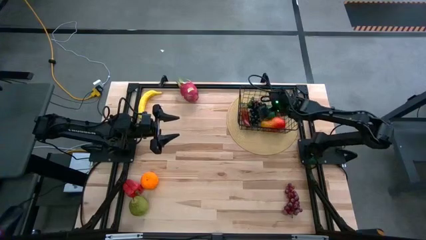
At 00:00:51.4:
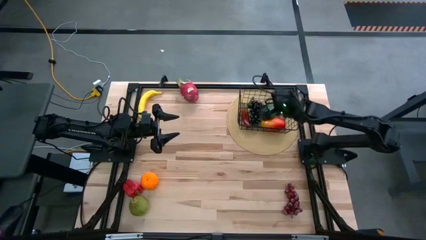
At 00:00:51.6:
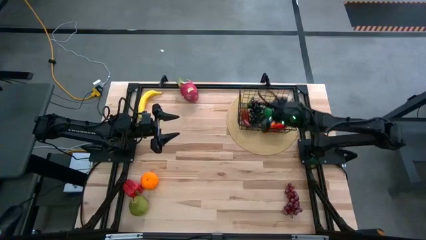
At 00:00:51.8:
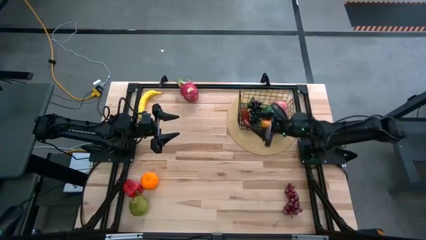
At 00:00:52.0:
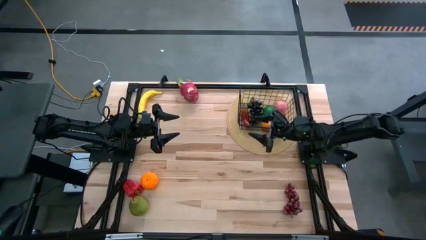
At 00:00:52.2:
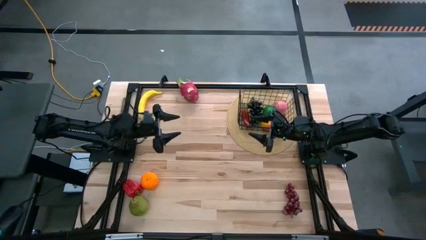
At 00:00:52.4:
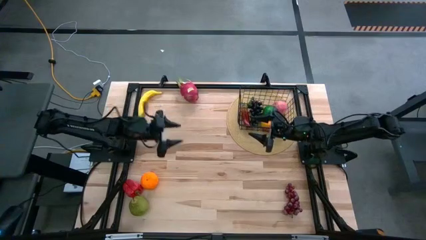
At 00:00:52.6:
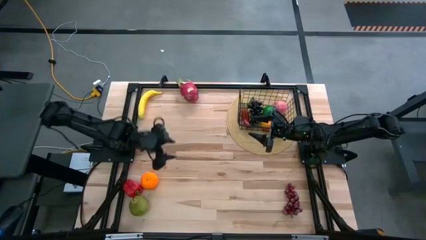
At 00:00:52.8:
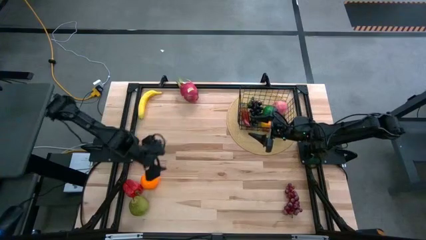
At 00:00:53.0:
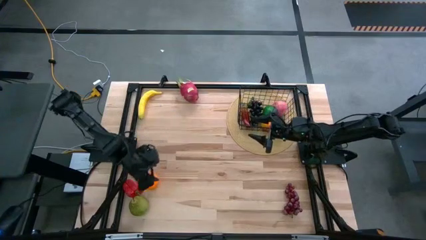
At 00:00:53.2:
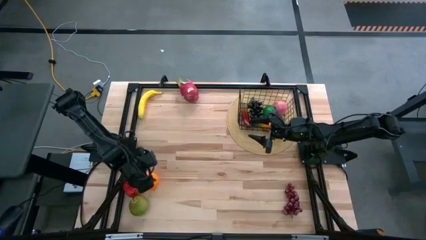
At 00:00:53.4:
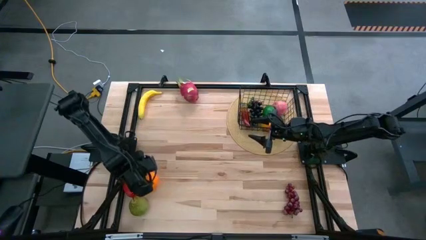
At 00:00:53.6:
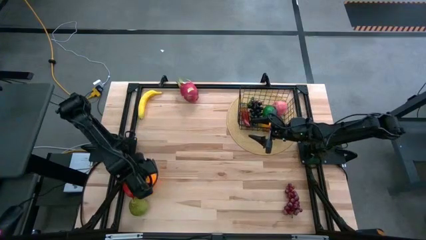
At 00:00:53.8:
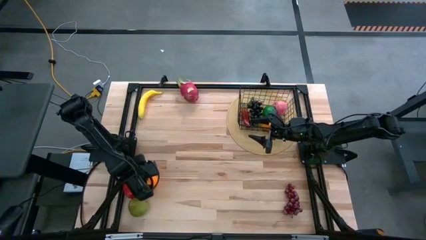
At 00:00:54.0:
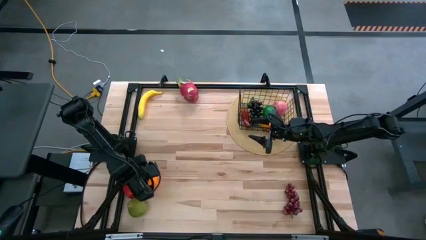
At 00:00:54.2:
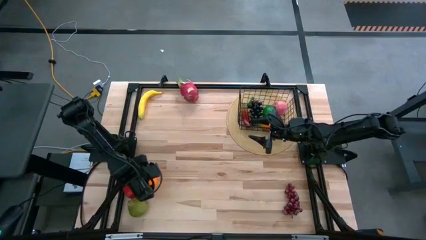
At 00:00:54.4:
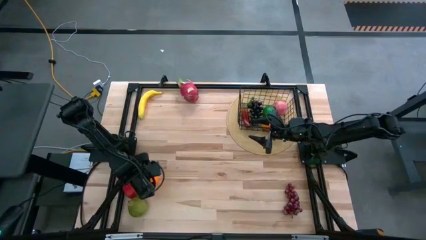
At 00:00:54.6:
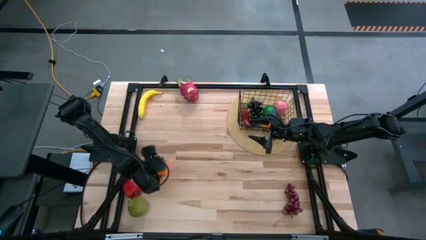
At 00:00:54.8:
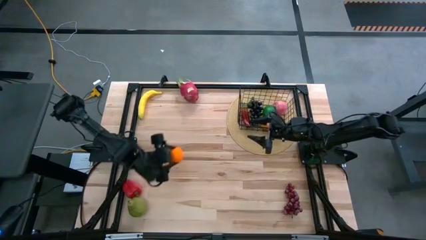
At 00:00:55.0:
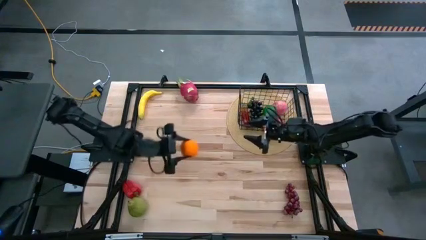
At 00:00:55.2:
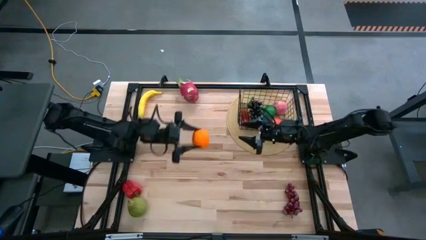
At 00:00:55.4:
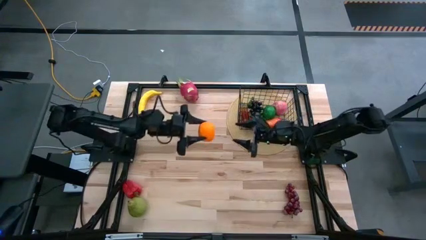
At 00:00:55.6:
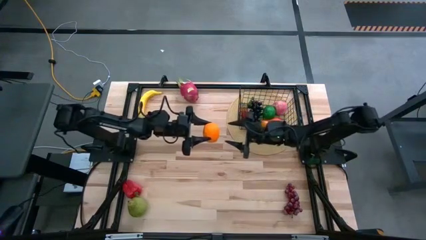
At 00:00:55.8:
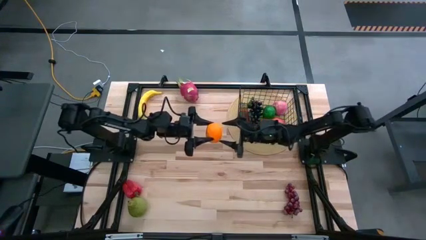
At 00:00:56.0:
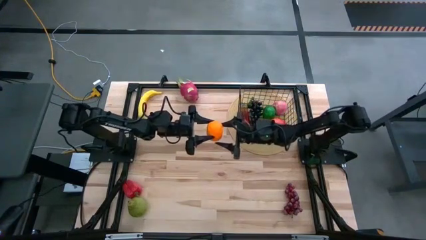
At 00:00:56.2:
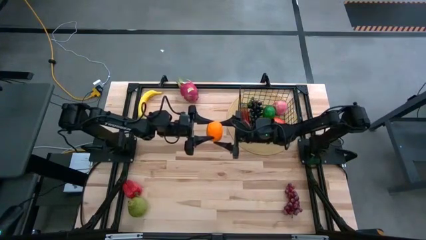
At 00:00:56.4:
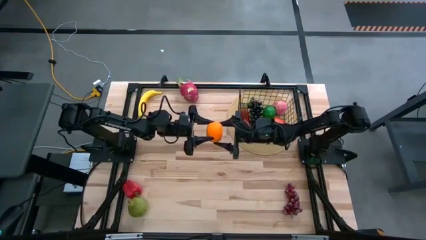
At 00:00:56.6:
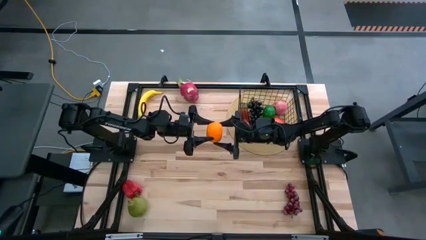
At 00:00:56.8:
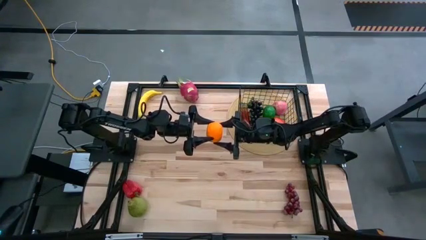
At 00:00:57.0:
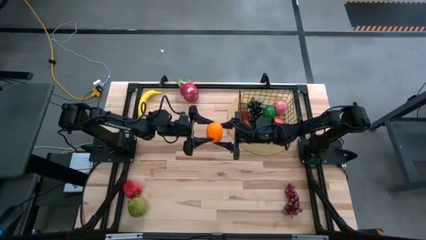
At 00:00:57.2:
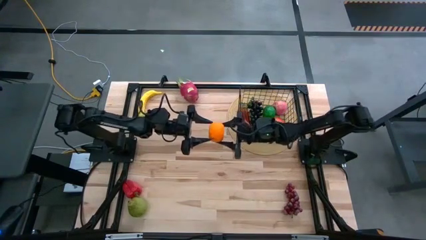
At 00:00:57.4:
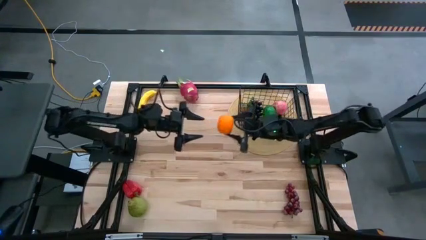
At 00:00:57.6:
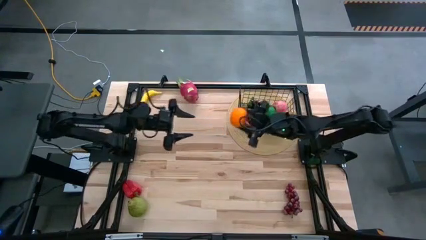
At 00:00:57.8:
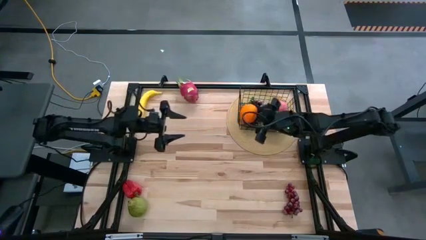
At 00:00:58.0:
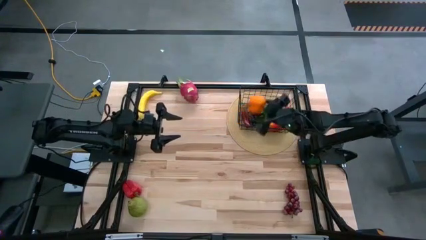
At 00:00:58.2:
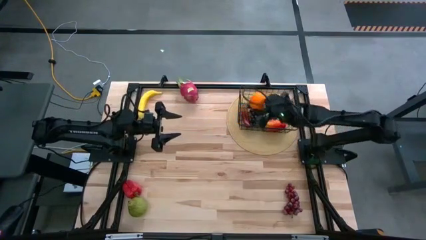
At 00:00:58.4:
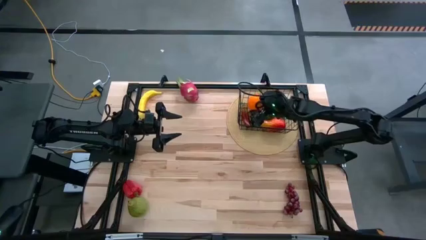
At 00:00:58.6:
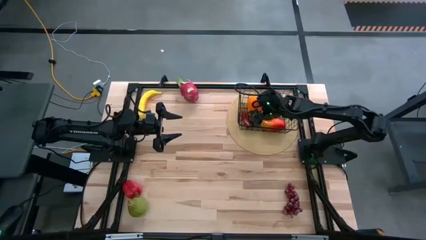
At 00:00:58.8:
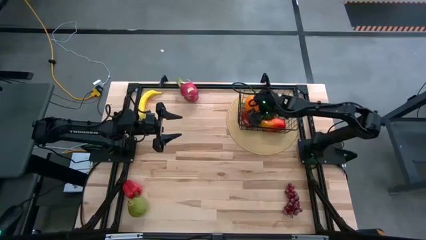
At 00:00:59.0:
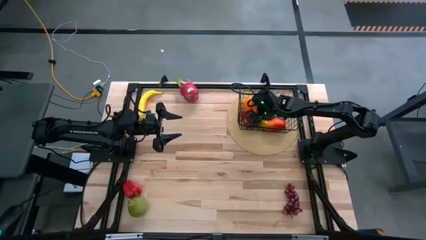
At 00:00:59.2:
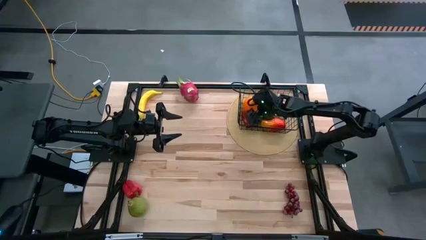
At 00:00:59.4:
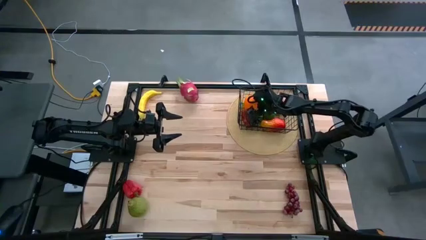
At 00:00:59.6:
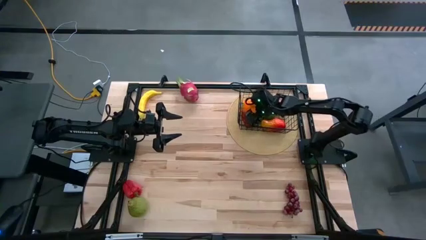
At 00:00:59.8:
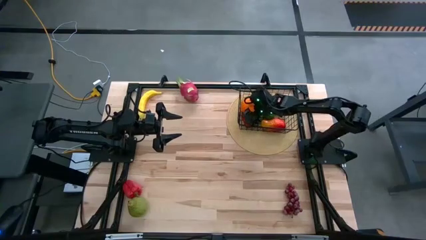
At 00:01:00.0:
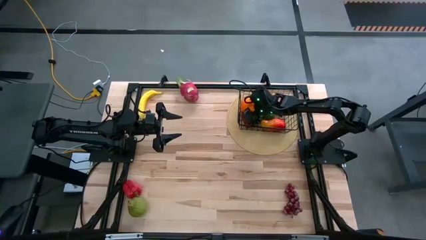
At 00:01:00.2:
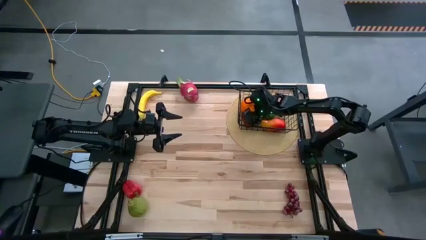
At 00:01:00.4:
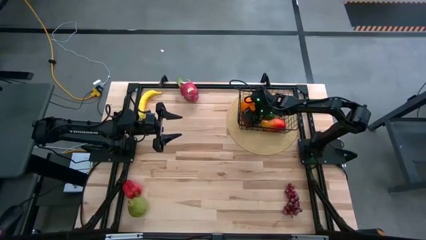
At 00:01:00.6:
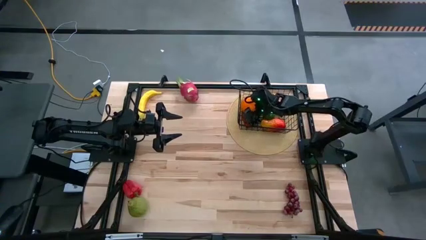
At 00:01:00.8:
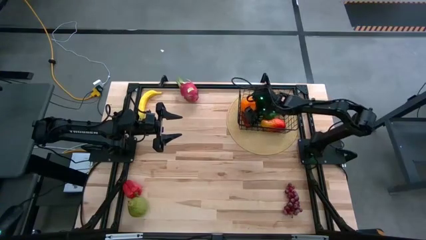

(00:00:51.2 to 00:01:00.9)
Task: Build produce basket
Put the orange into the wire basket
